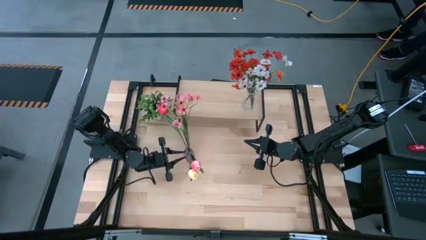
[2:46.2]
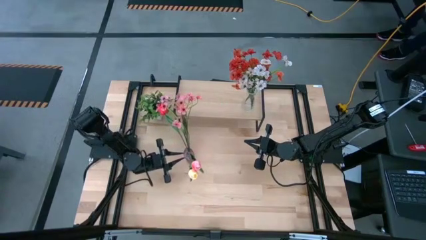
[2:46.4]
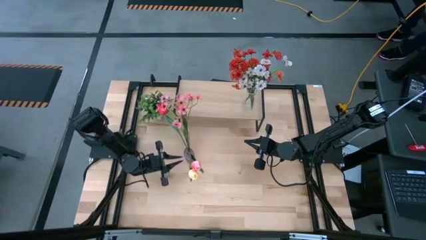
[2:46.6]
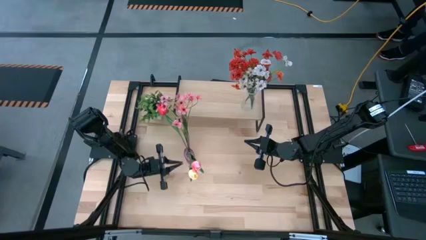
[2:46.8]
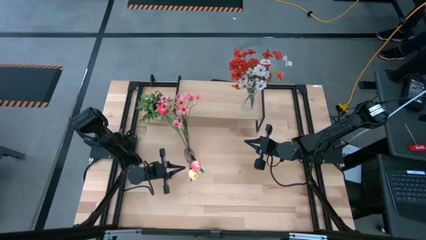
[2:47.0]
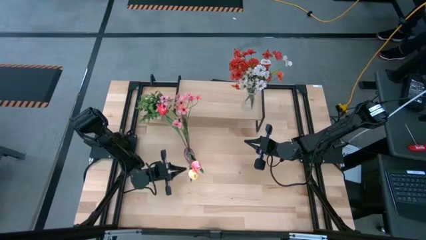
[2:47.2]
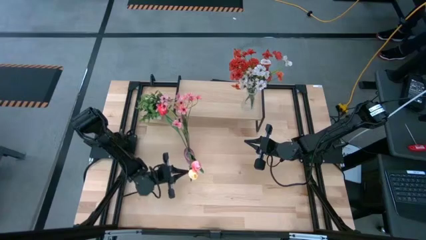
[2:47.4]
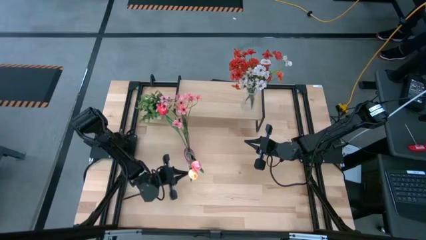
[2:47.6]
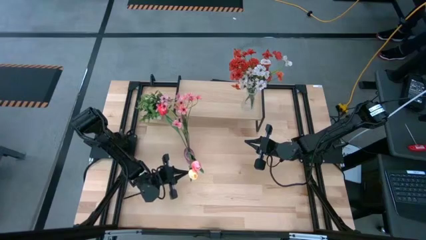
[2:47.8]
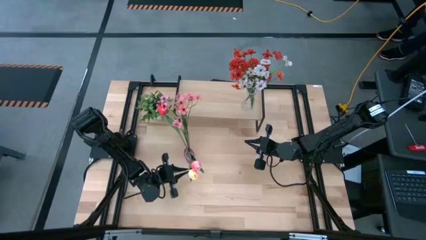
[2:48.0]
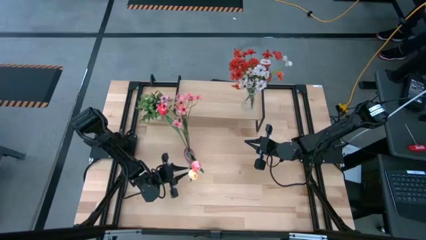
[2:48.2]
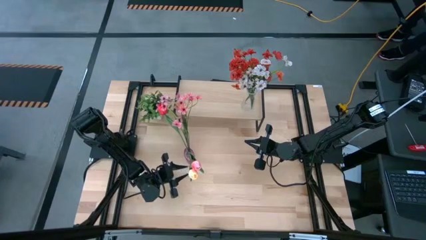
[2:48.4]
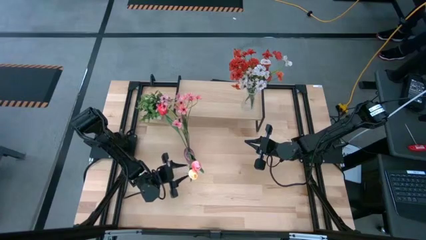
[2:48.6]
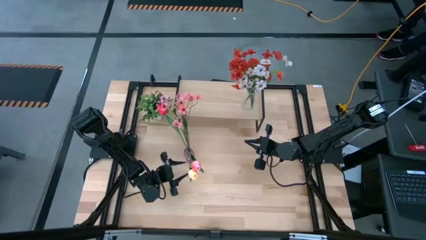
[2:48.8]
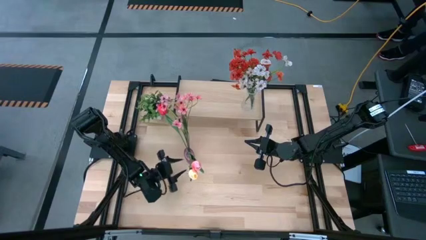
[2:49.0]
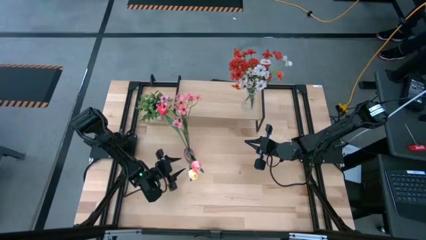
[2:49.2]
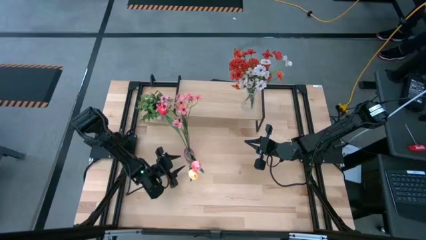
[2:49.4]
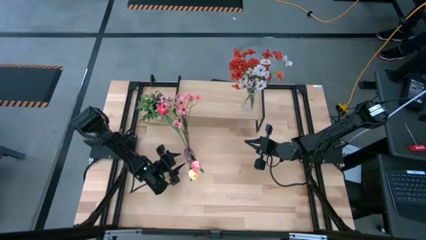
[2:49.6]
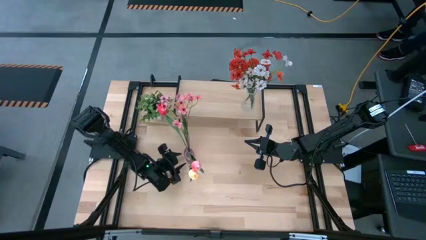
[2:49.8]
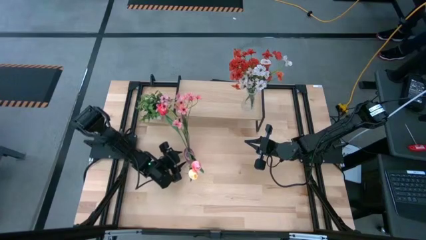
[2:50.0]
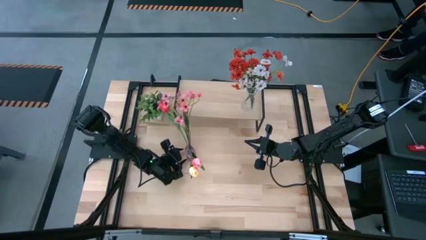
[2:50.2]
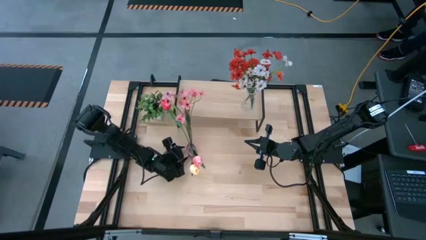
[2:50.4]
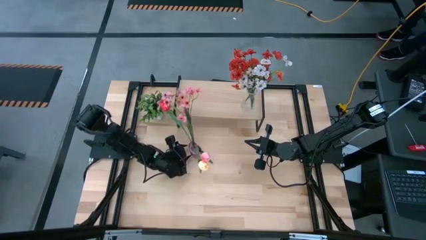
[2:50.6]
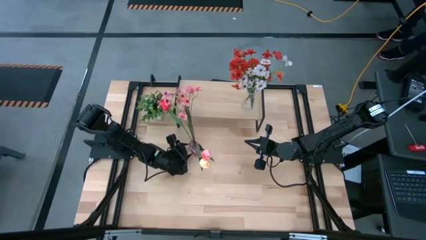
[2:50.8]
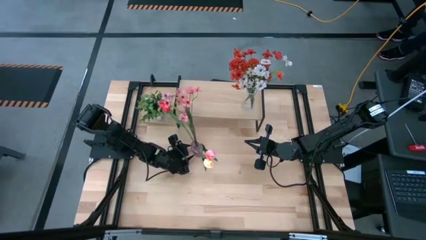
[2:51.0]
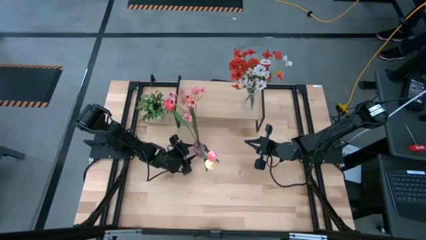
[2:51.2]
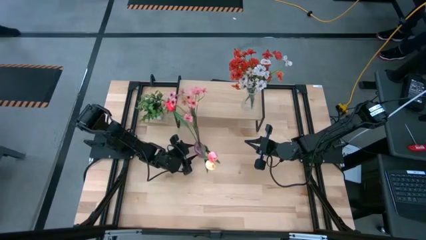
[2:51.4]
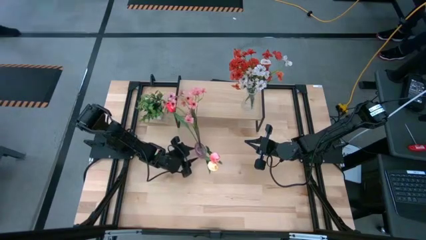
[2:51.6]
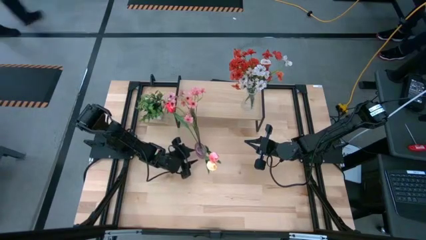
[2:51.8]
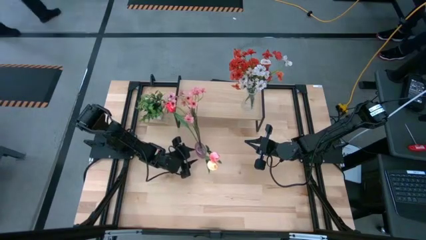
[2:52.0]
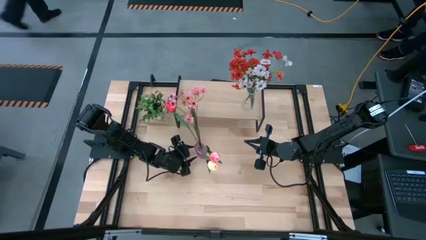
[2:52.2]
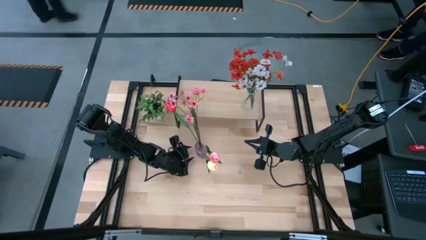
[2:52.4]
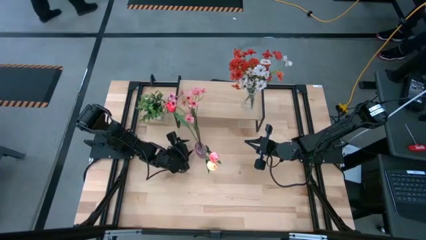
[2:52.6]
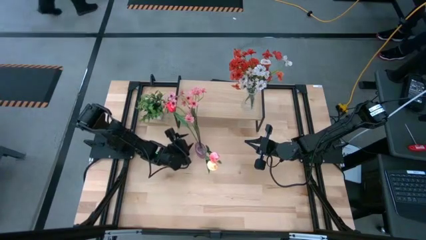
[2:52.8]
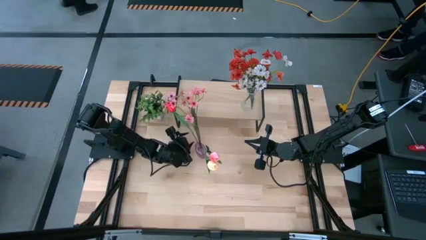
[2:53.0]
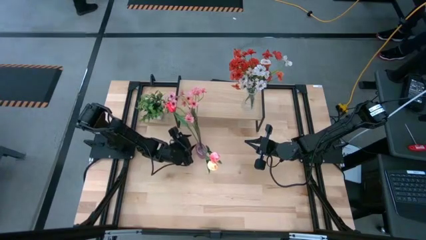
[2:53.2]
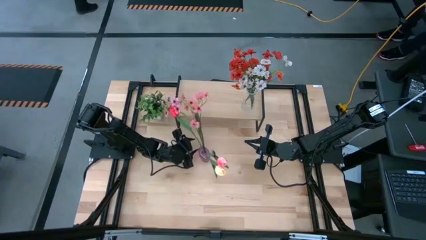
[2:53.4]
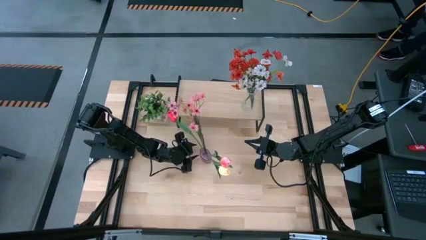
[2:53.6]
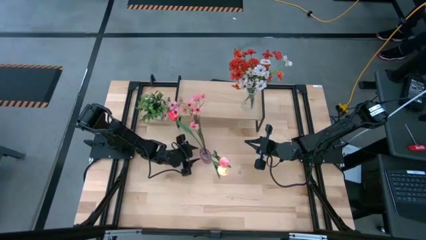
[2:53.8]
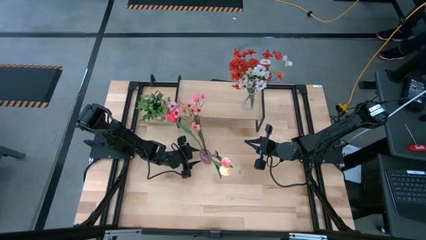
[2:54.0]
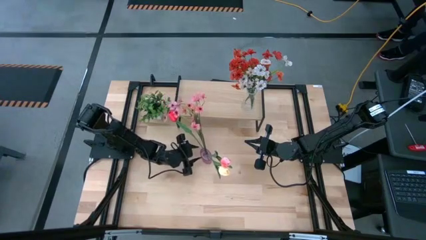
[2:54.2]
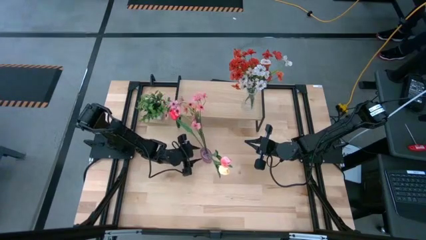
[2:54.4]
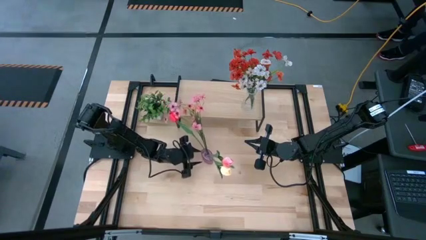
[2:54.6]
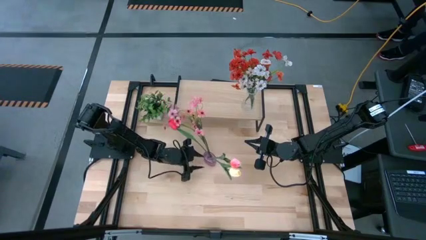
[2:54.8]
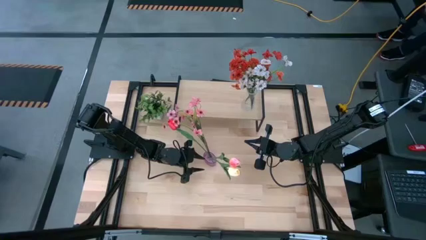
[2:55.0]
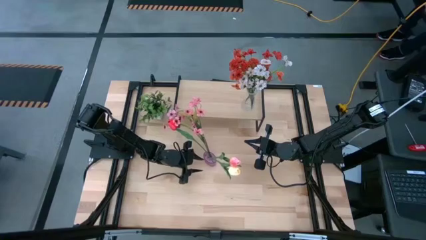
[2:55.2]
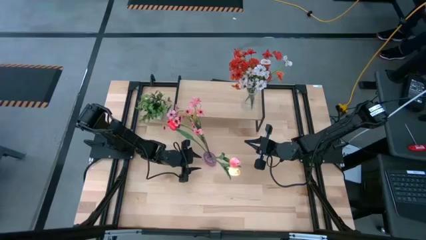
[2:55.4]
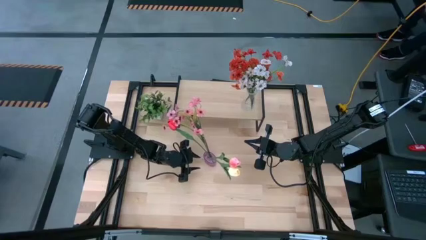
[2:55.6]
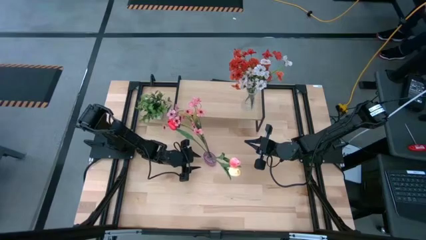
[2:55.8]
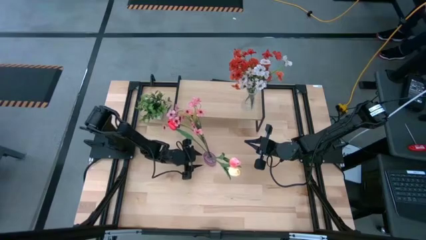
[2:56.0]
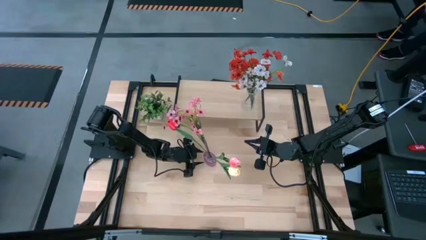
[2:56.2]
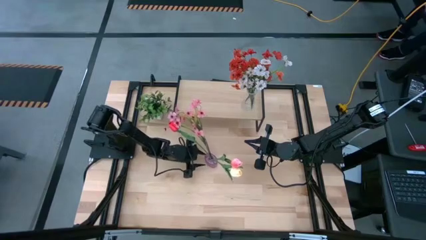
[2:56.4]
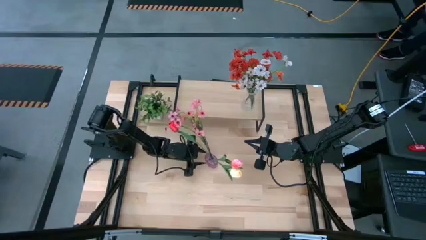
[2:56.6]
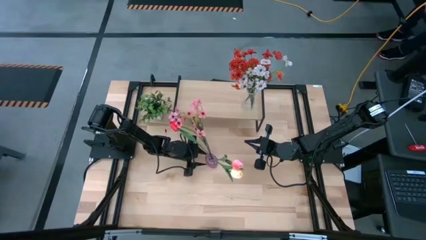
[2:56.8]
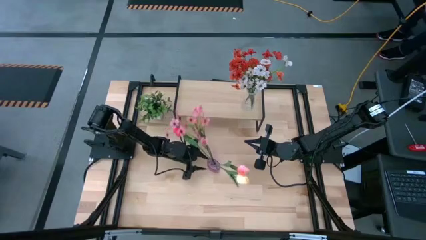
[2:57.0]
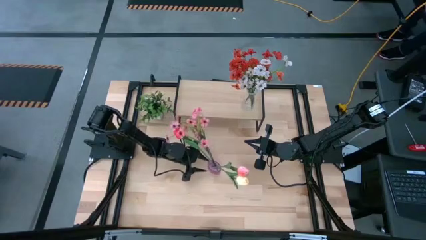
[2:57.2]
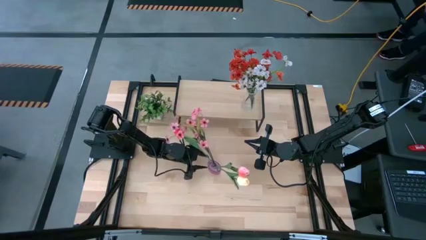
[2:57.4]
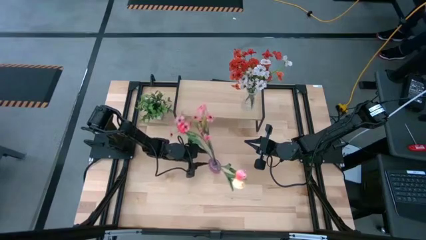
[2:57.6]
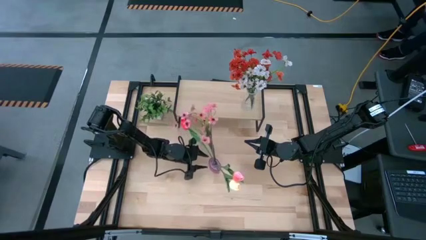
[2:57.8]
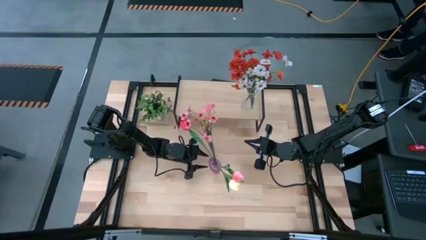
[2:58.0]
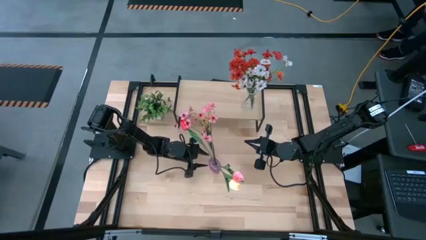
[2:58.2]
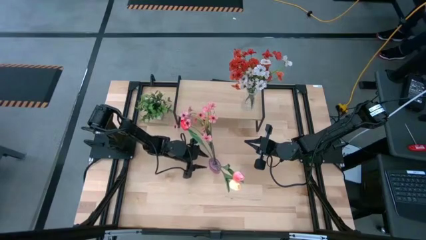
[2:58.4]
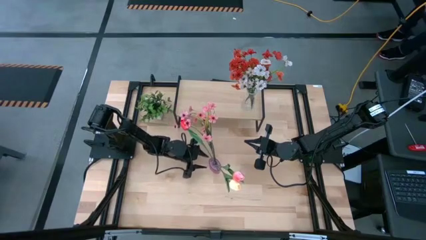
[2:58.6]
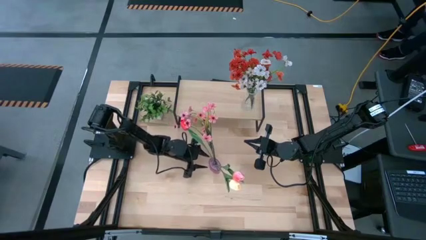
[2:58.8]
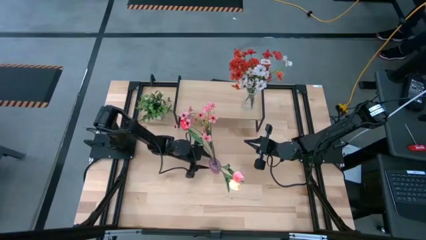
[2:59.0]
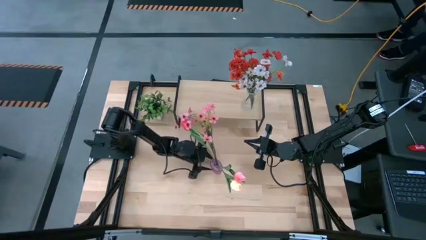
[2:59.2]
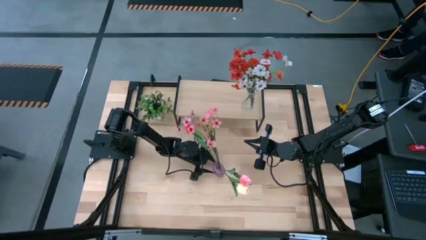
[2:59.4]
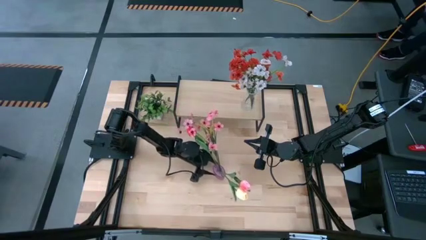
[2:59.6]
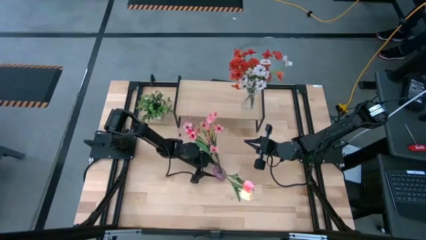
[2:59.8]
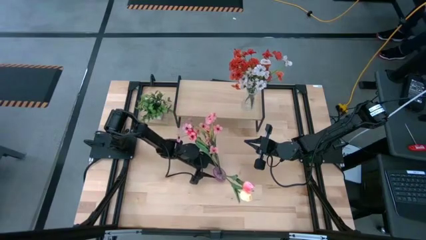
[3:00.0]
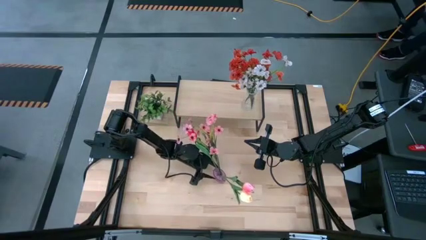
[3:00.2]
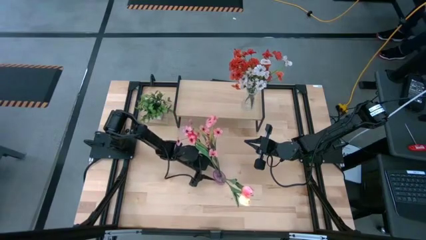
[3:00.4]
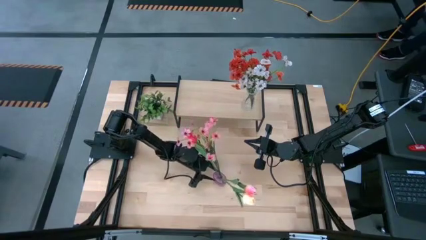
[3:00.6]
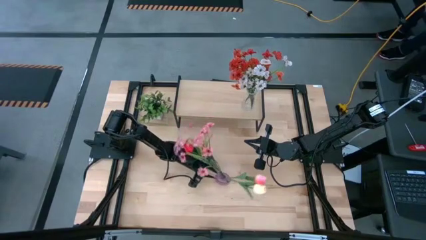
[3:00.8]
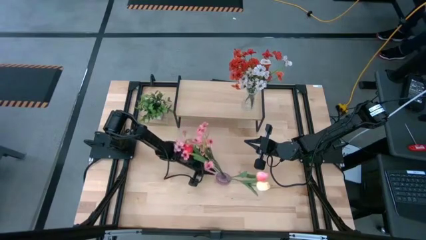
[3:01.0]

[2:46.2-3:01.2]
Task: Pick and place flowers into a vace then onto a shelf
Put the purple vase with flowers on the shelf

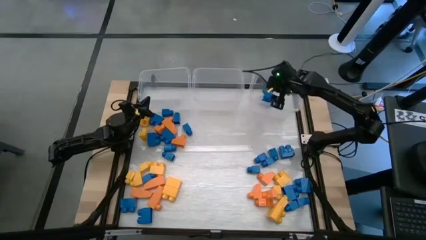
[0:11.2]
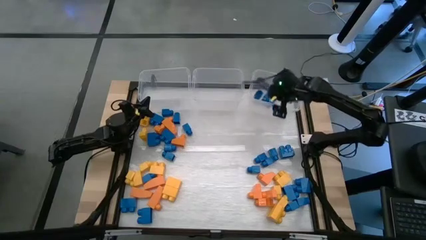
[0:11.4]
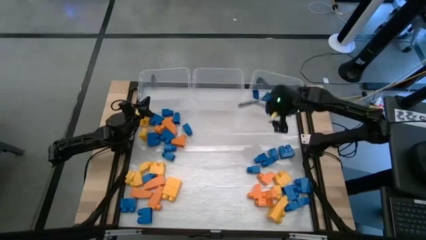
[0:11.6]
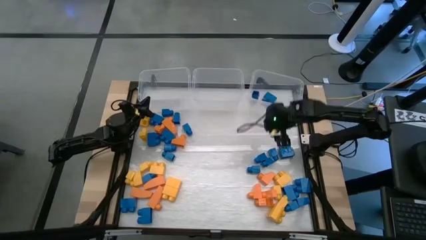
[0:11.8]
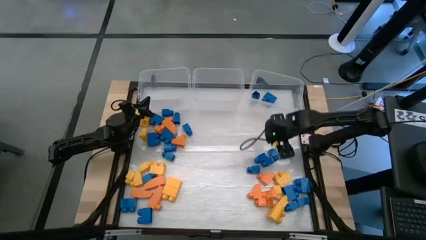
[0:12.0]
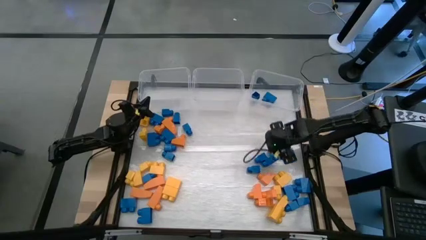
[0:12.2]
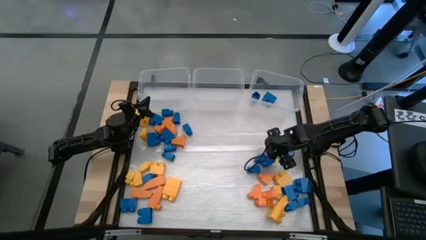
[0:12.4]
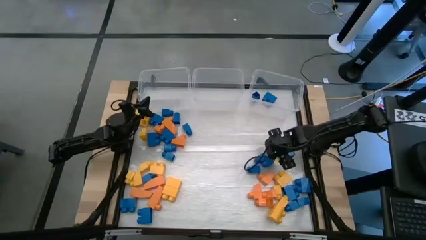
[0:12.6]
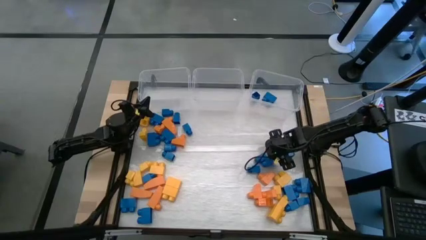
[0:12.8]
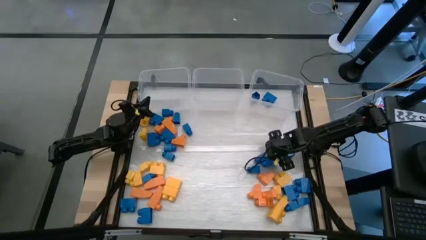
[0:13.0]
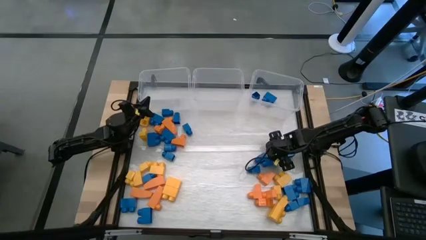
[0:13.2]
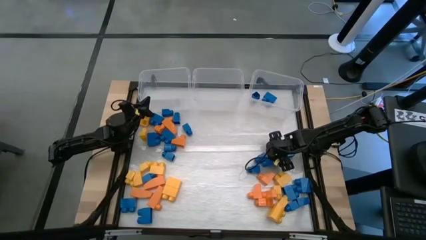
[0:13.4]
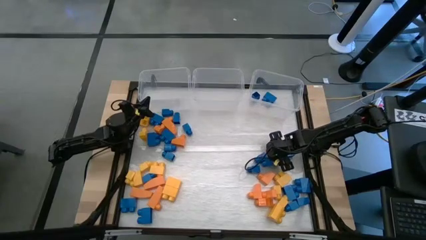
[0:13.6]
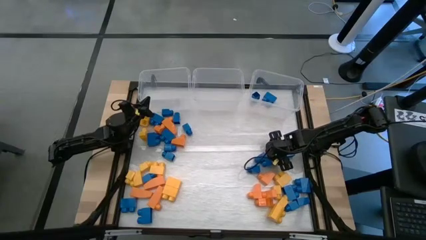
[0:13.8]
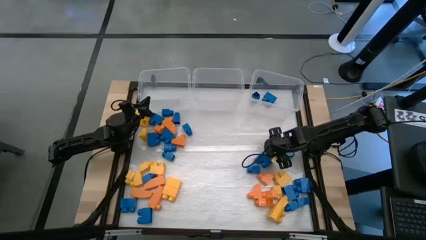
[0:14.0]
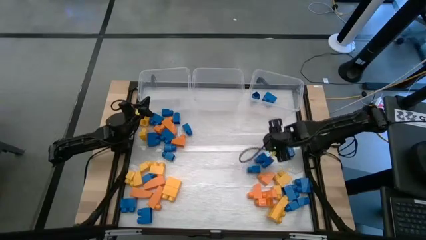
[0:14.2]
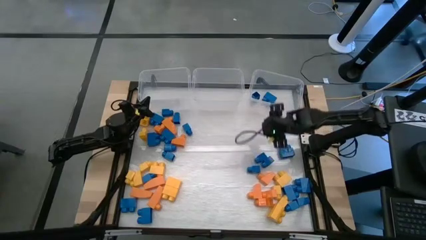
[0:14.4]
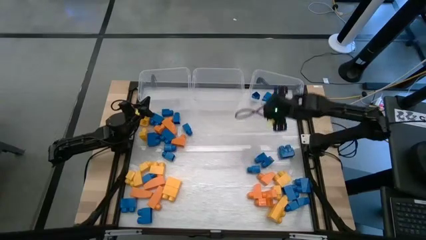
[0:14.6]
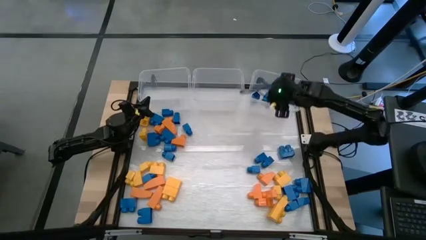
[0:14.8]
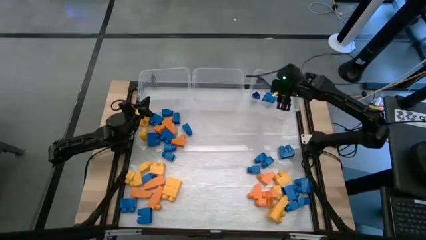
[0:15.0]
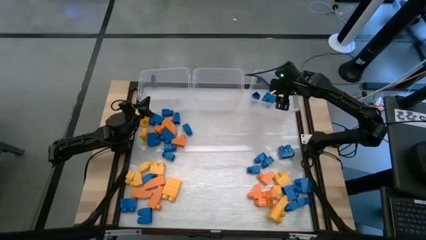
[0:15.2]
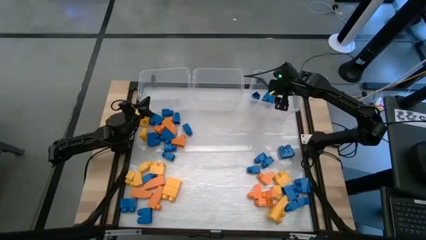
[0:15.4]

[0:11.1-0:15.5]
Task: Sort blocks
Put the blue game piece into the right transparent bin
